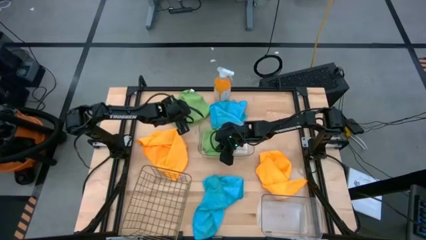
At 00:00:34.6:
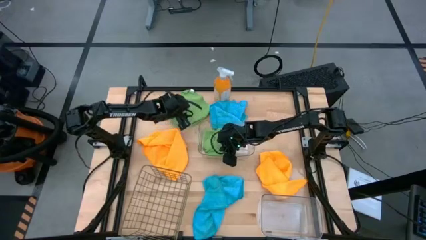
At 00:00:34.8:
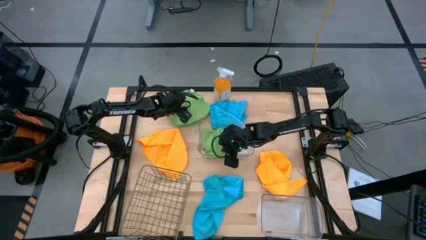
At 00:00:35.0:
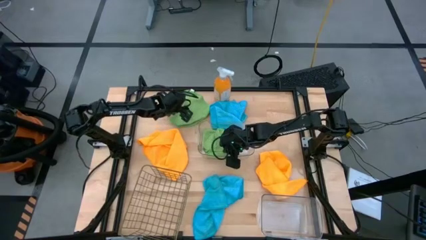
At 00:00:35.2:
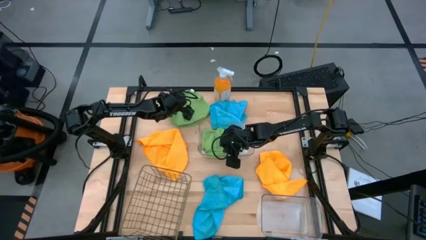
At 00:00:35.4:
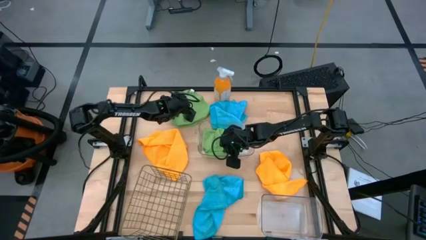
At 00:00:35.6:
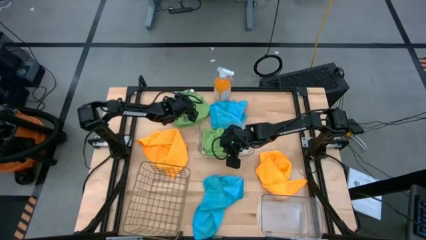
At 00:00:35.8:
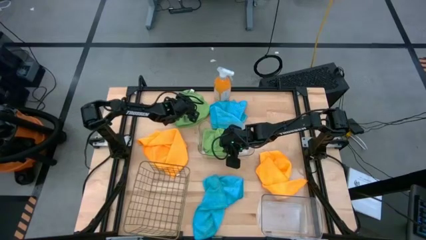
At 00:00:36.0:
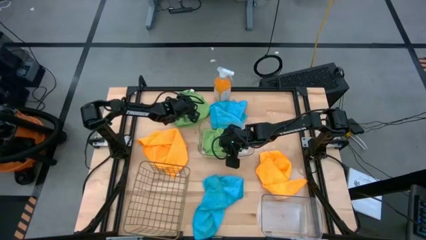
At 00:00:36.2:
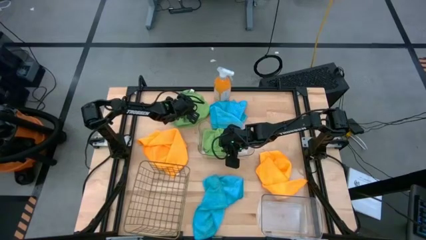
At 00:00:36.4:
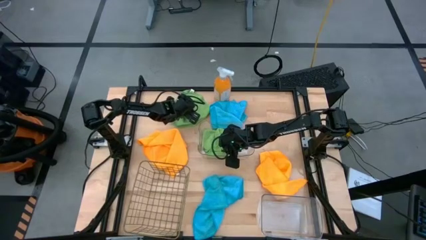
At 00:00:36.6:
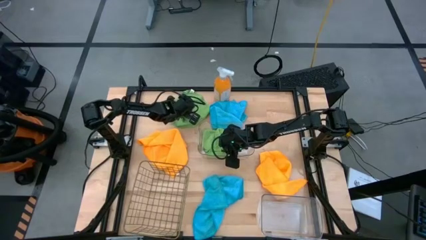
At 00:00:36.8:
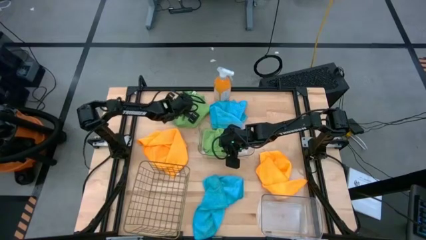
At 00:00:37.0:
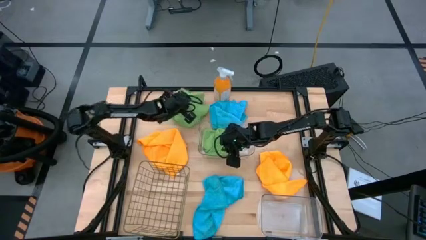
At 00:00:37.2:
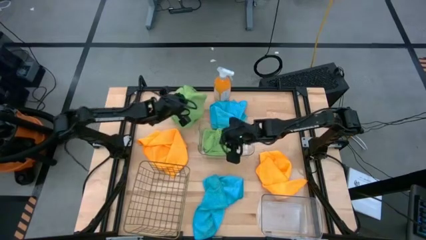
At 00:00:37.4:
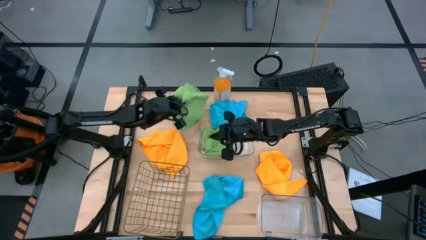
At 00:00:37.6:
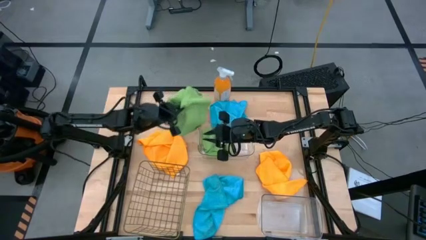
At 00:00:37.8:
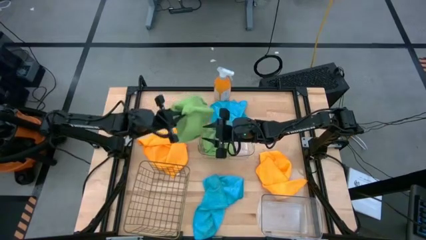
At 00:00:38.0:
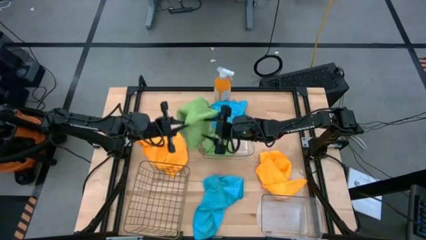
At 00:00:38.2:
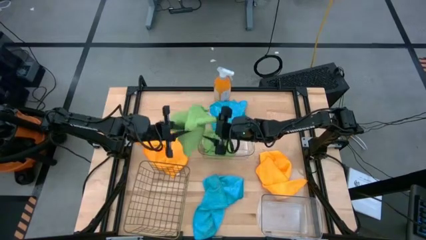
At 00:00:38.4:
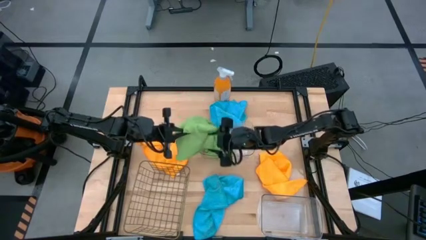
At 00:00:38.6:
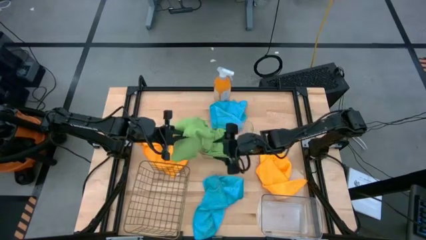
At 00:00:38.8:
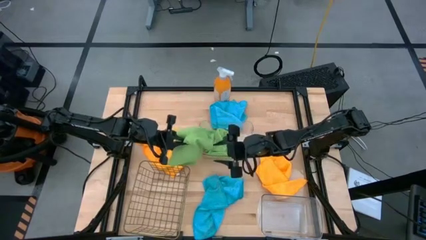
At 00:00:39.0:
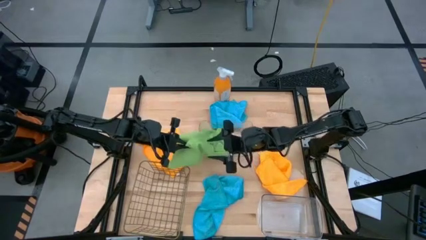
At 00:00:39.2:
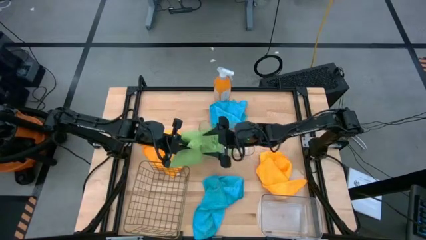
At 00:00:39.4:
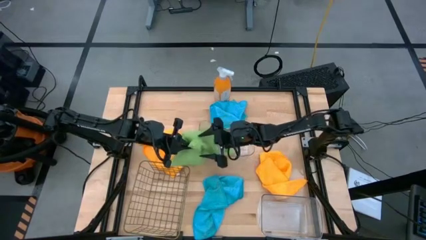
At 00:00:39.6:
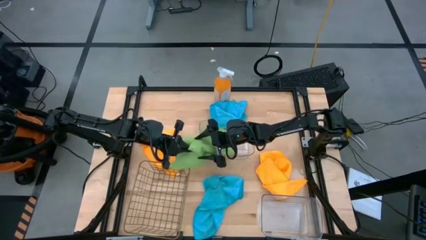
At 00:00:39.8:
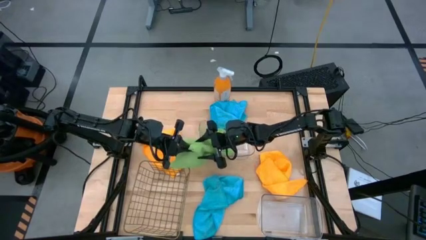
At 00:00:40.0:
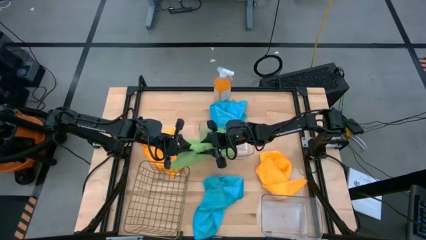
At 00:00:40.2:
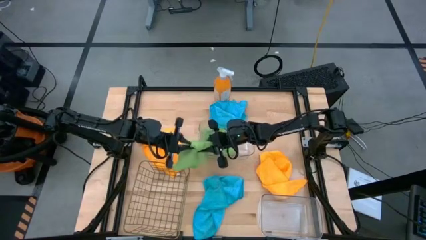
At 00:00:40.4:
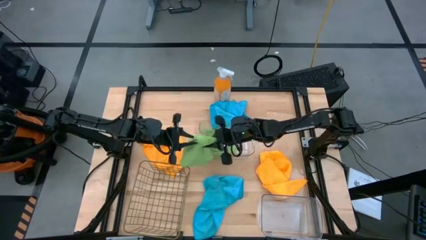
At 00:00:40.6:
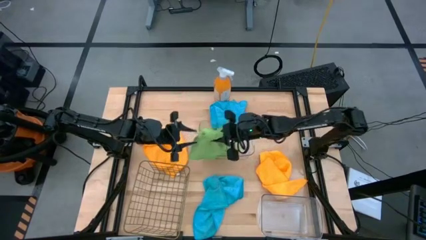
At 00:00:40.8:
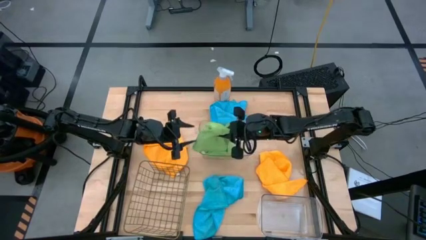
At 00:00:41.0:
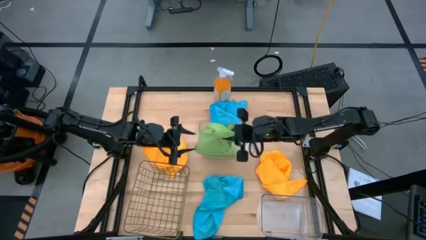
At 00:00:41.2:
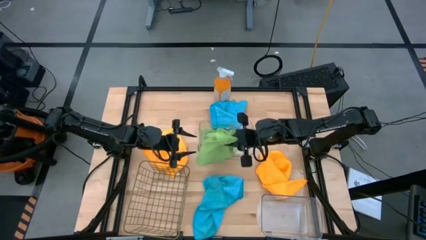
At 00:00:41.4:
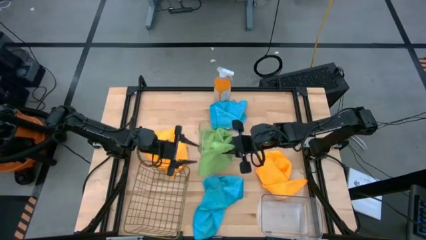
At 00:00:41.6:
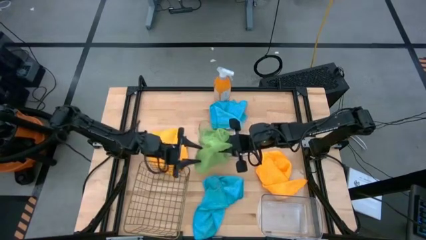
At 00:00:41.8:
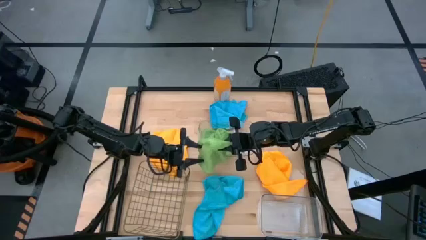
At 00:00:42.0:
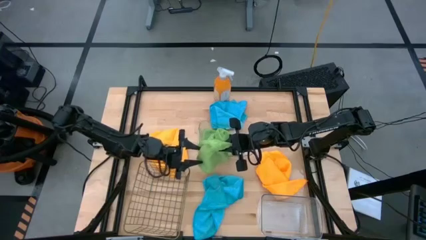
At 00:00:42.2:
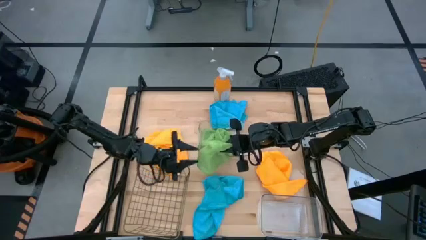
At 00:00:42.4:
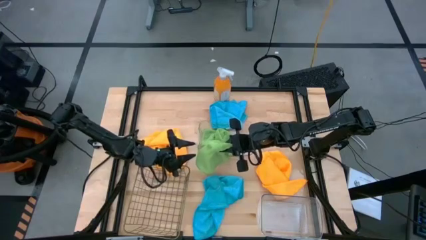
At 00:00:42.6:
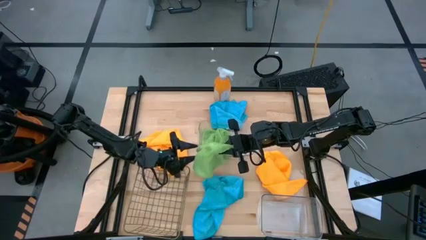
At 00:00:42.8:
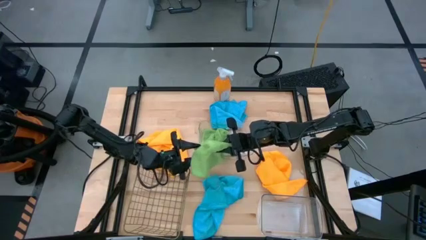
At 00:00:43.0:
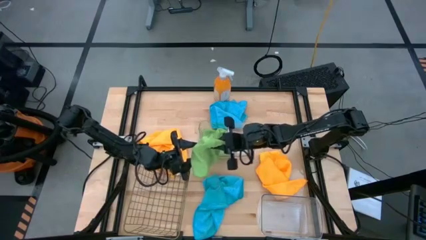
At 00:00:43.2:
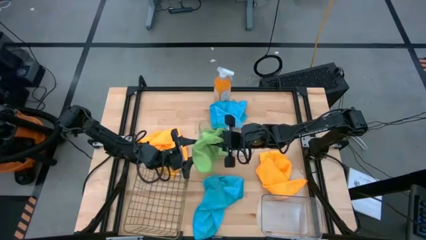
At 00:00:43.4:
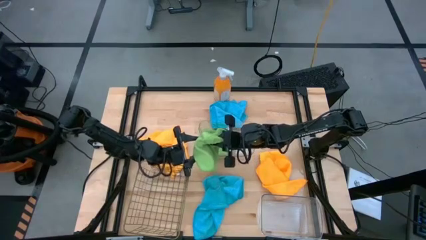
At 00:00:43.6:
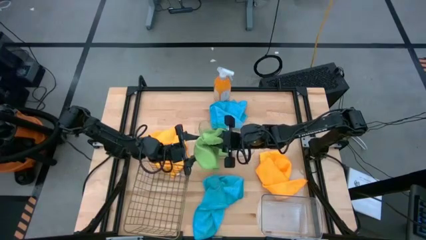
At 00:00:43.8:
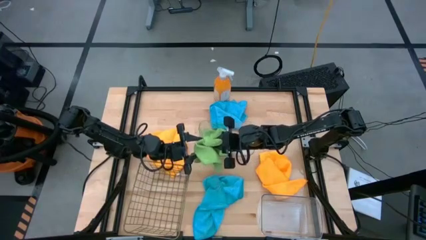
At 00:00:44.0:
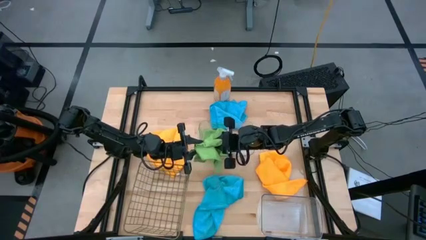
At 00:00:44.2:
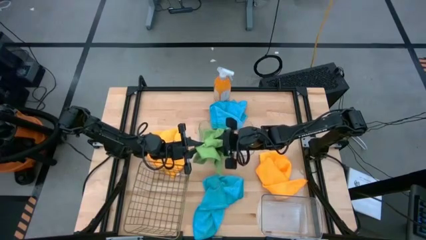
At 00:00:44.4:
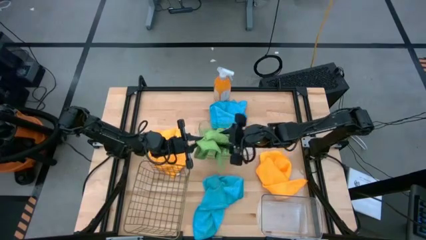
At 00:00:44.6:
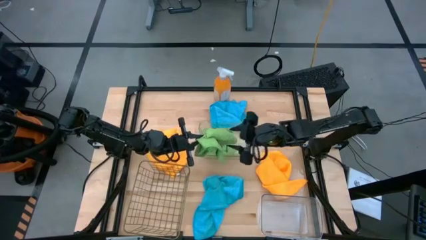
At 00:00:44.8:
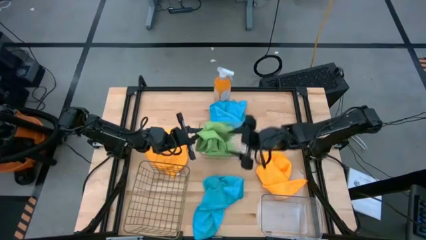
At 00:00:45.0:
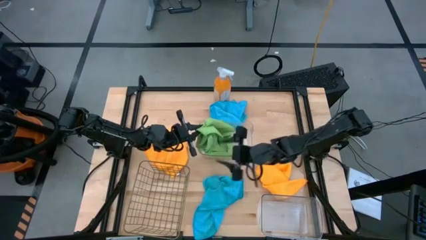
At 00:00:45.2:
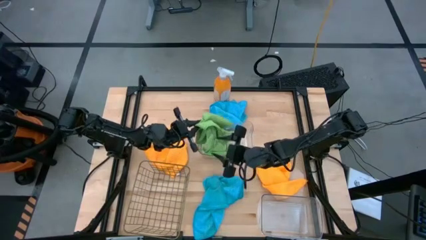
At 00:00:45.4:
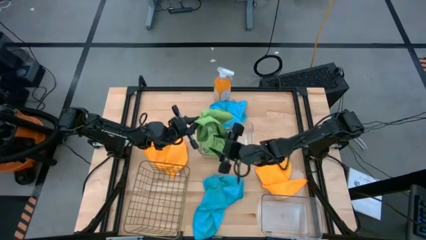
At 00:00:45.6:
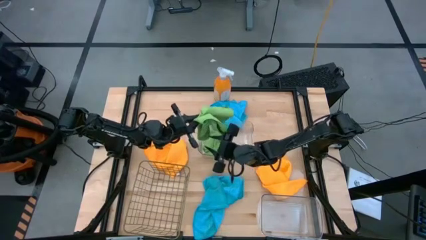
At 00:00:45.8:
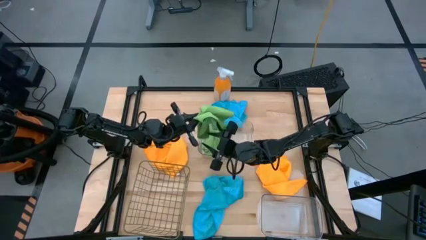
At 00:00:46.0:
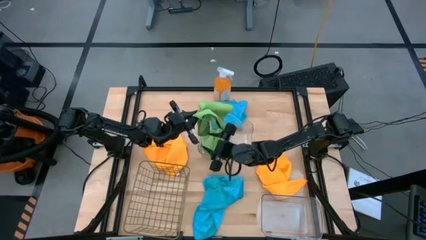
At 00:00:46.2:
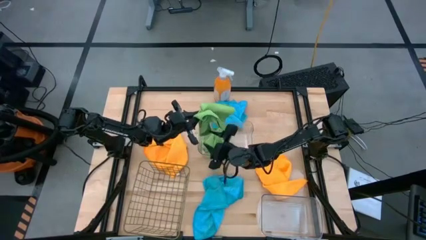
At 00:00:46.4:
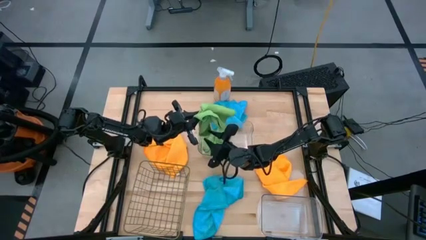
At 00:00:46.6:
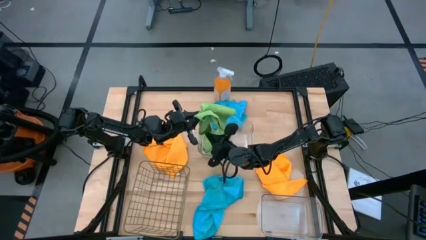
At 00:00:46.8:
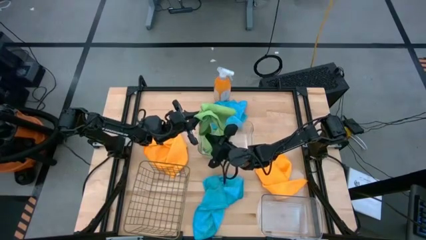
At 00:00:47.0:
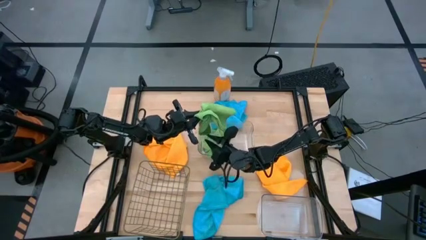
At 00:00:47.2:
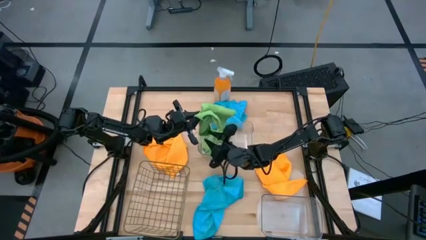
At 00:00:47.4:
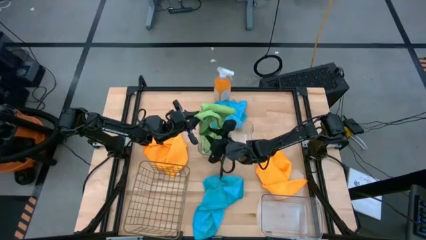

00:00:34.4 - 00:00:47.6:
Task: Sort microfiber towel by color & place in baskets
Put the green towel into the top transparent bin

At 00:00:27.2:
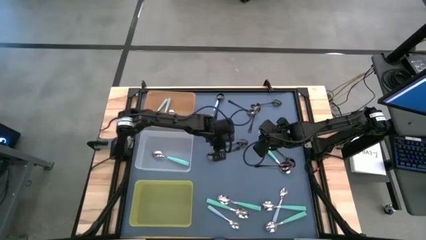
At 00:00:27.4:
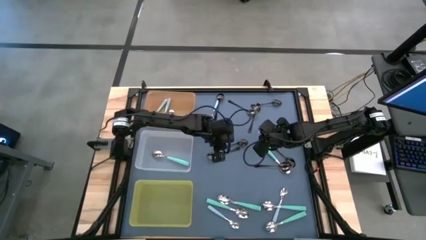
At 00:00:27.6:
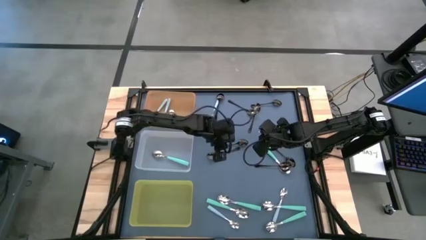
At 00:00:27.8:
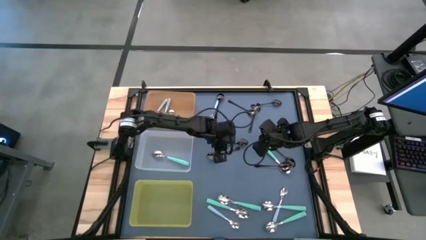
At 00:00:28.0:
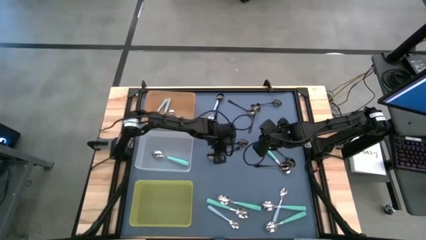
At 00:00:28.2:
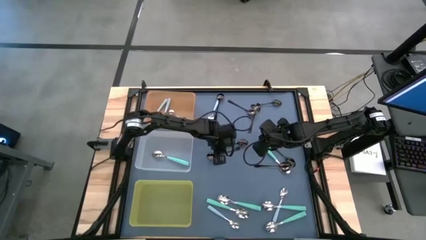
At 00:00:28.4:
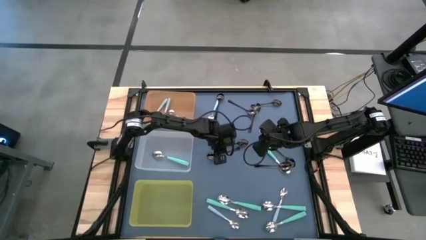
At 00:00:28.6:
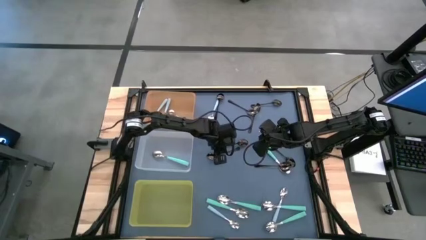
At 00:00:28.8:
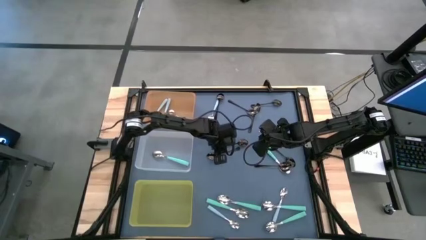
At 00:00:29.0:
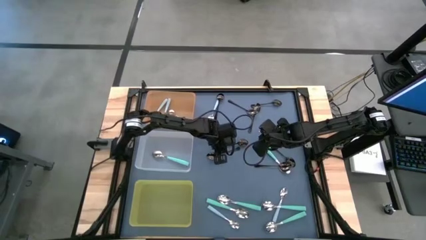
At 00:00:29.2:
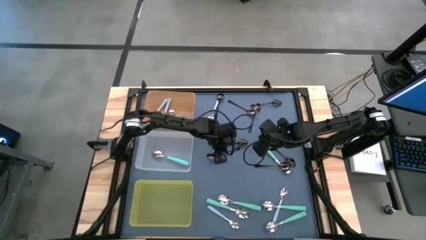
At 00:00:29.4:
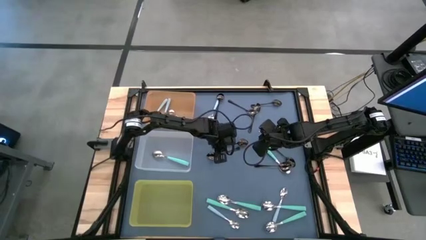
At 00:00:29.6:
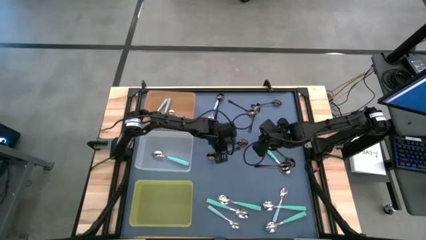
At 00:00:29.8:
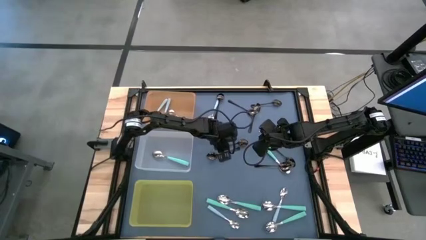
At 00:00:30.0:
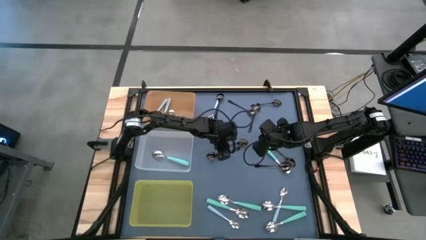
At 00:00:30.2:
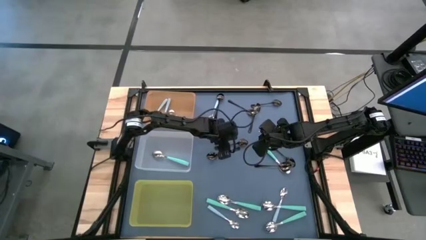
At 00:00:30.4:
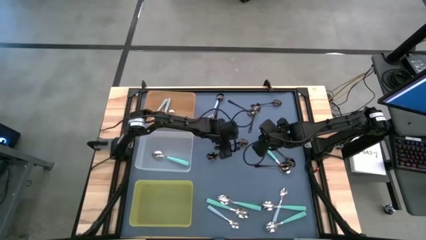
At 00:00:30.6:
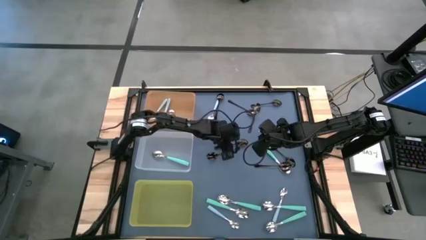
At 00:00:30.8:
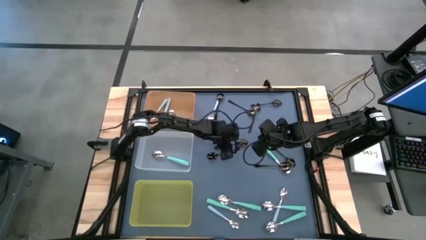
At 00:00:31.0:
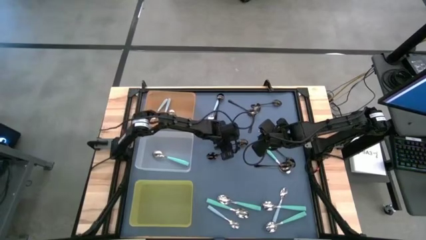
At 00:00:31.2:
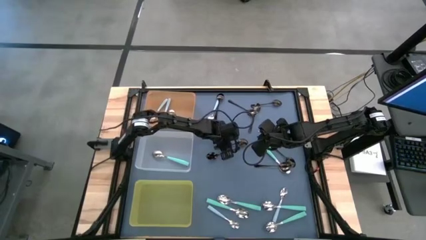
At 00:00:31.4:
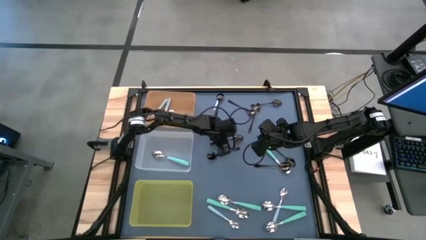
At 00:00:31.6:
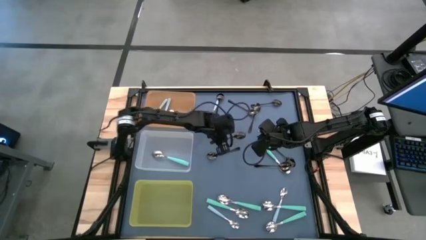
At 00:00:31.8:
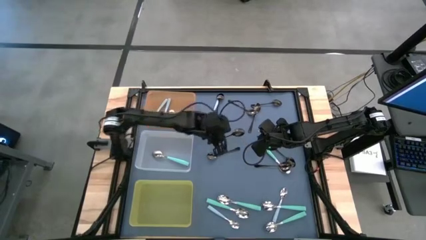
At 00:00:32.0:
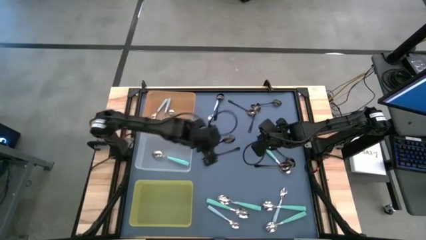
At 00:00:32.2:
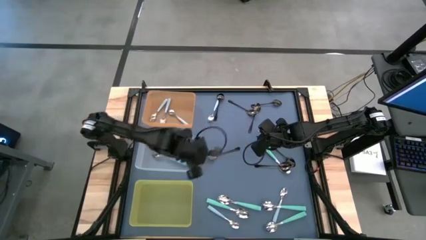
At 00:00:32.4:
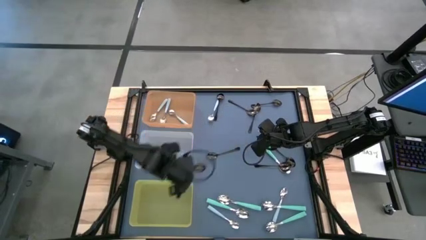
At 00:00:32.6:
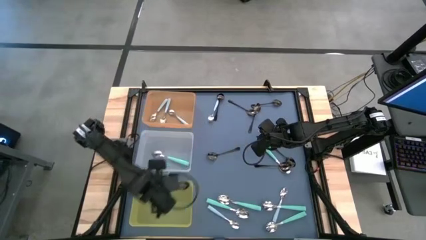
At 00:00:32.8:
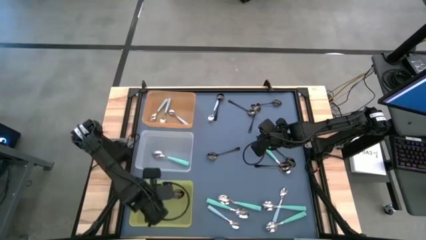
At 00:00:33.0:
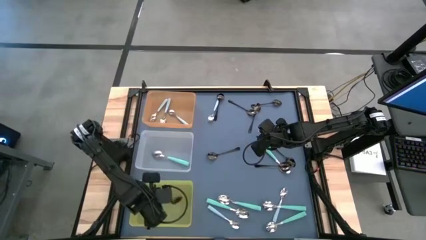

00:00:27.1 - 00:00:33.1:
Task: Sort silverware by color (type)
Put the black spoon into the yellow bin
